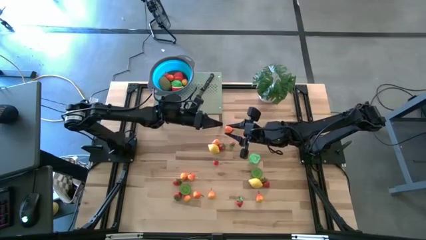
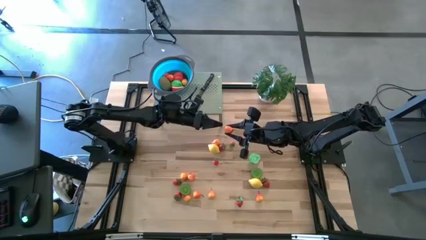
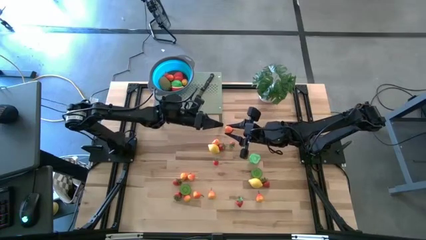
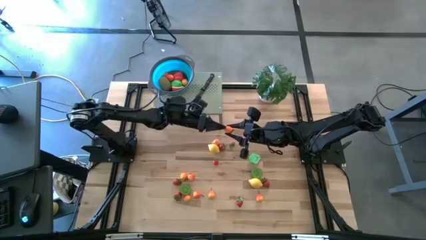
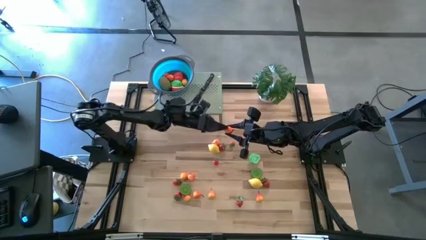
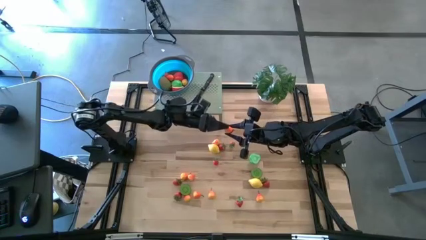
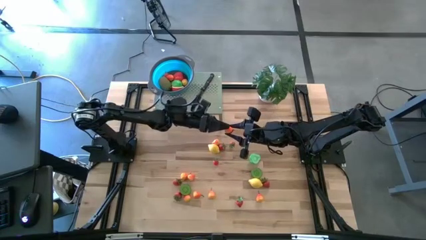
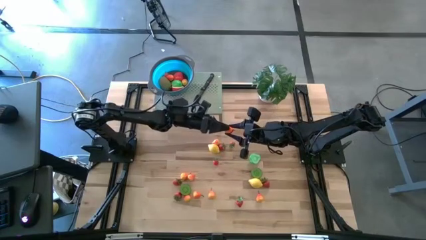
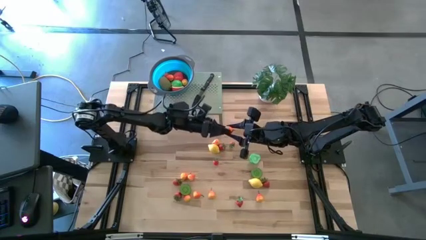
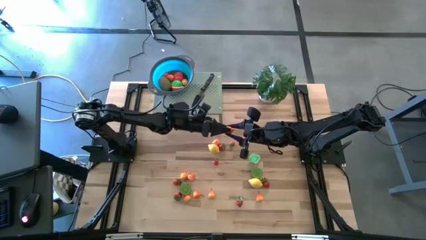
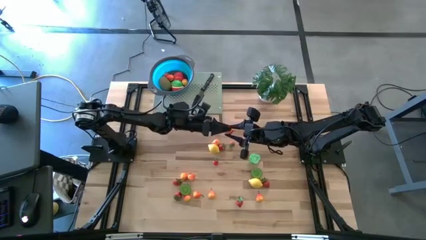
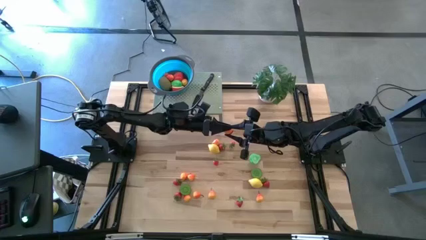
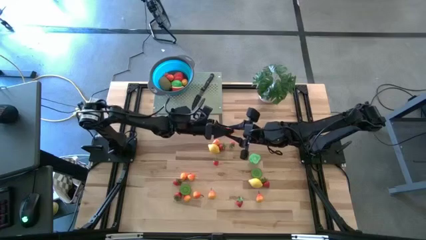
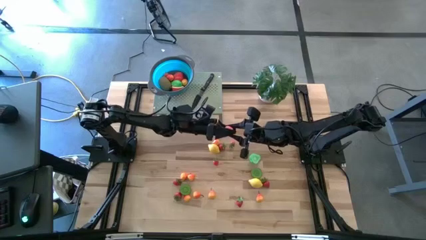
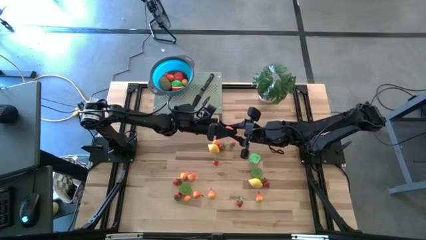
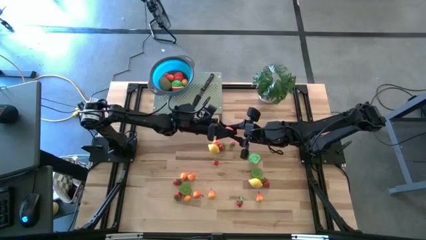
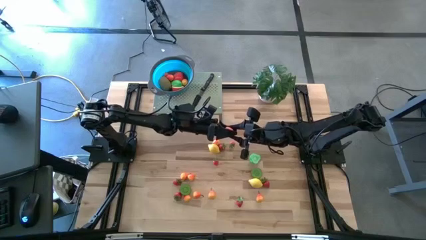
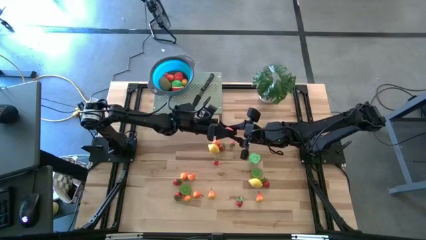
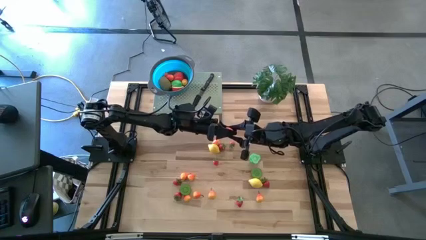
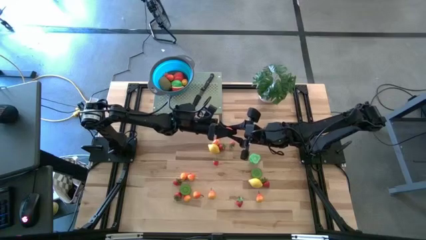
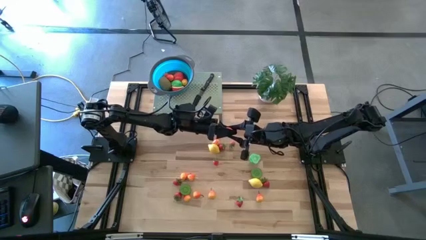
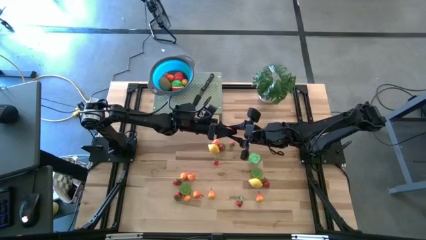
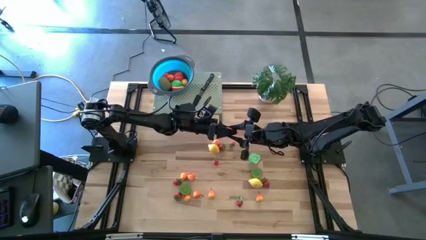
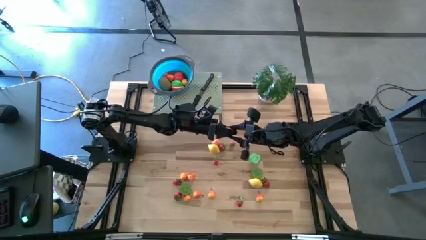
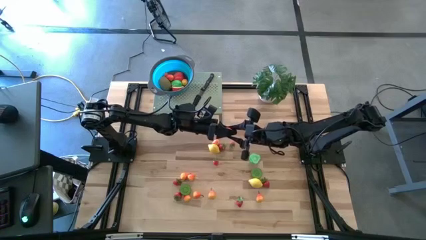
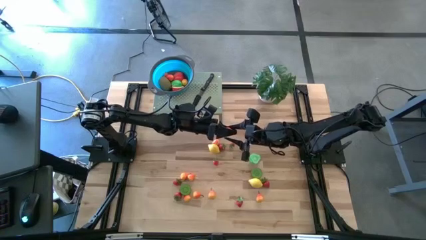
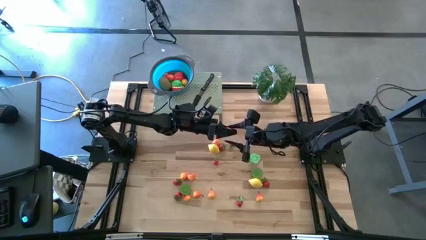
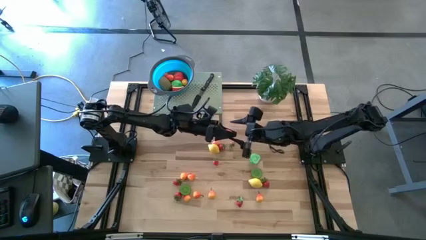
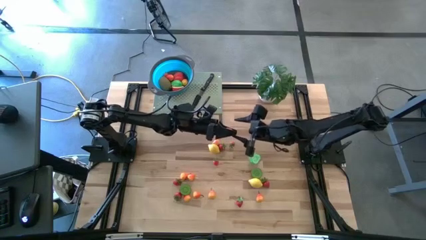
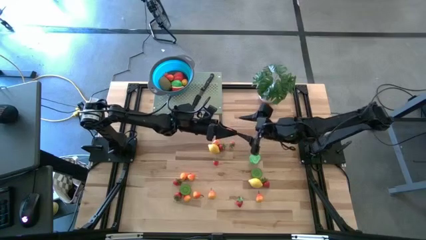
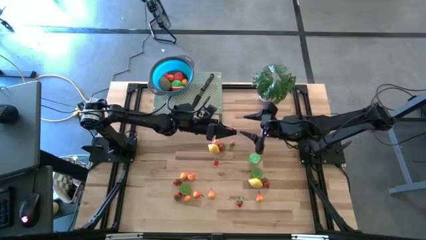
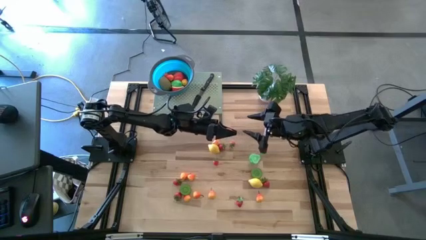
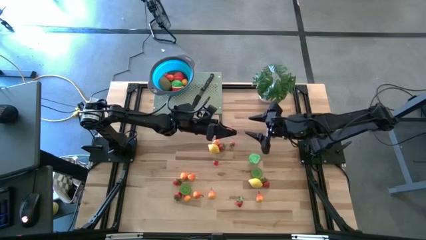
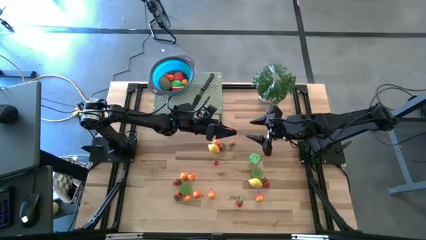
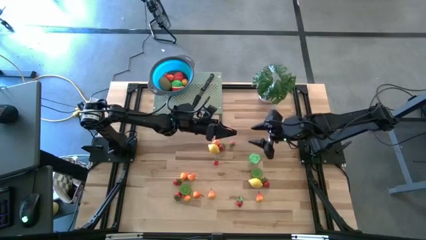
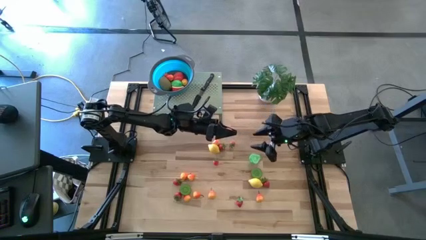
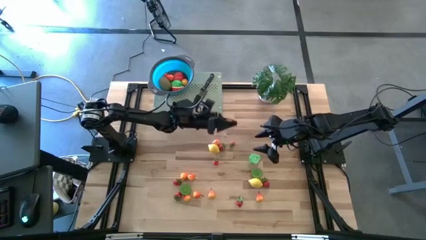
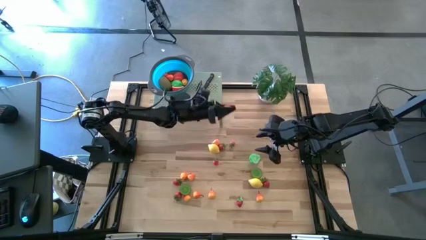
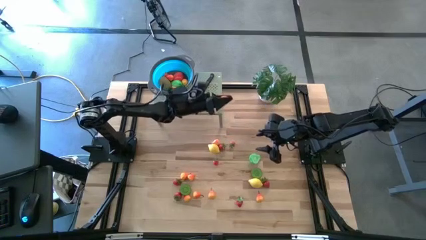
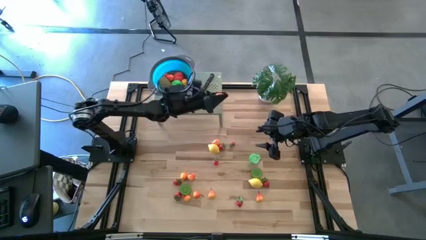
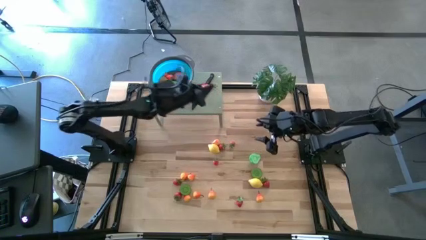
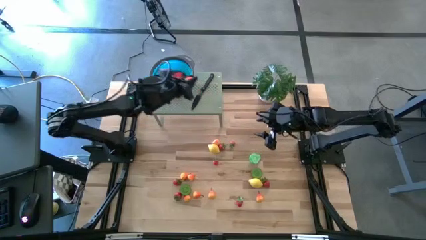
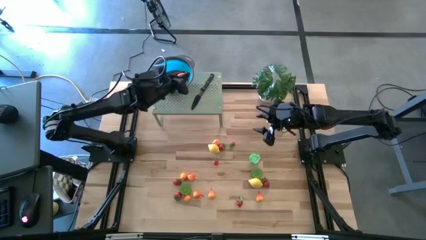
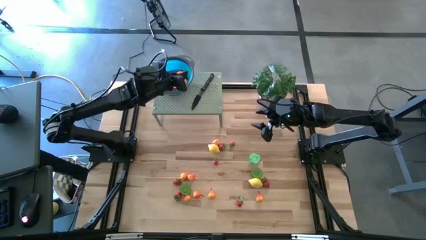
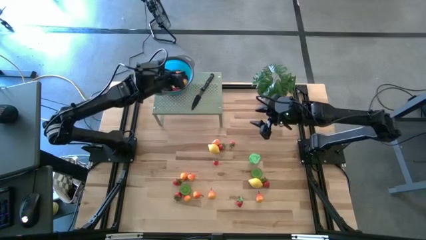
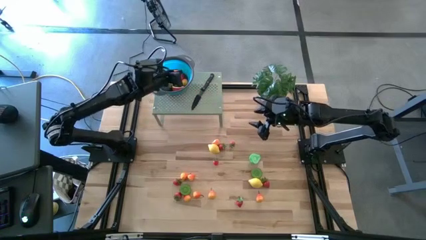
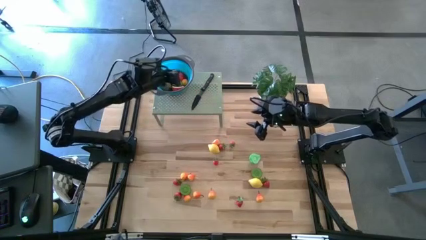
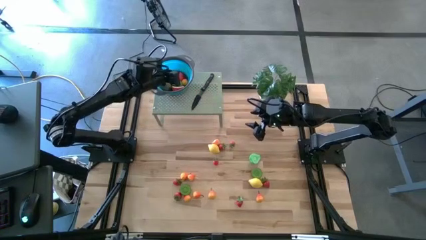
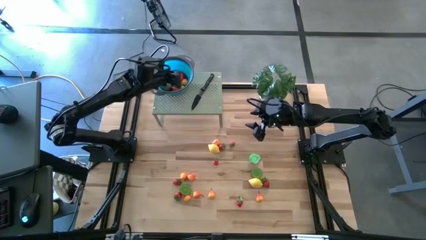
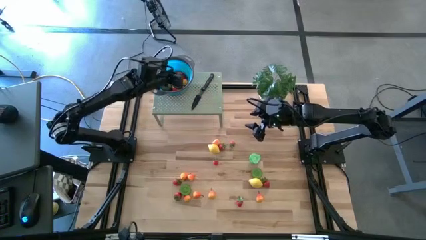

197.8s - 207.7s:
Task: Pick & Place Fruit
Put the orange pear into the strainer bowl on the shelf

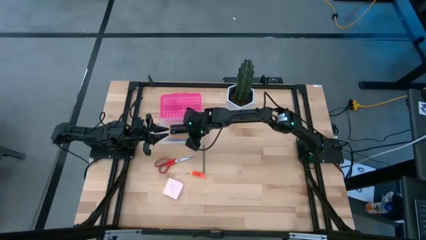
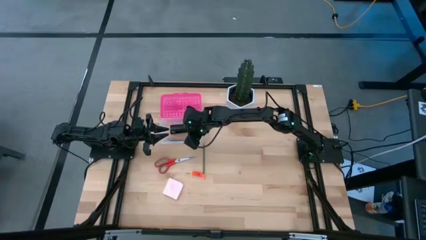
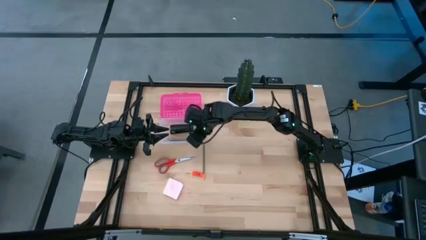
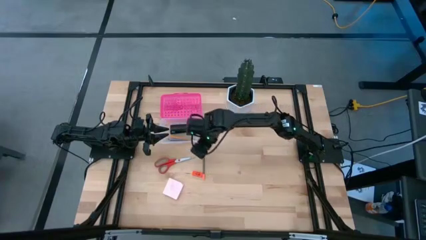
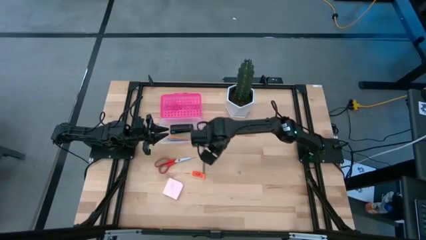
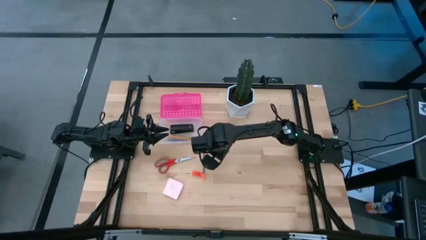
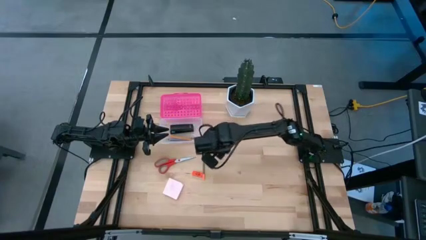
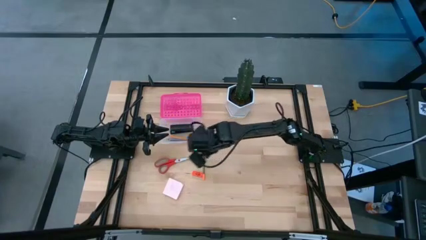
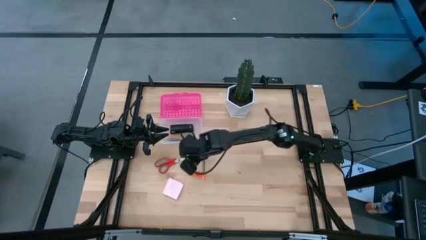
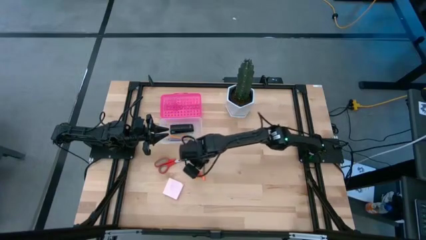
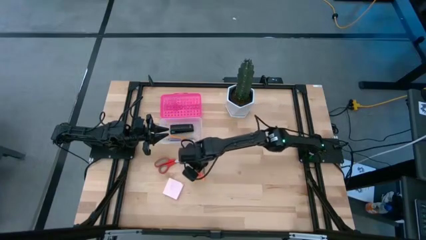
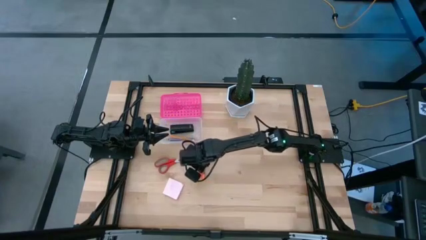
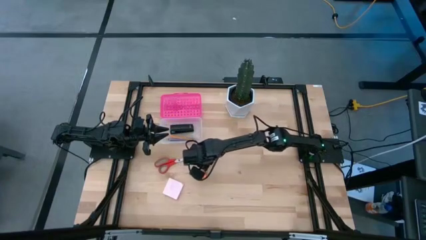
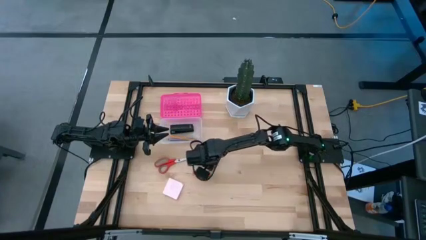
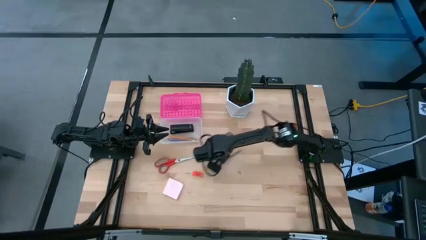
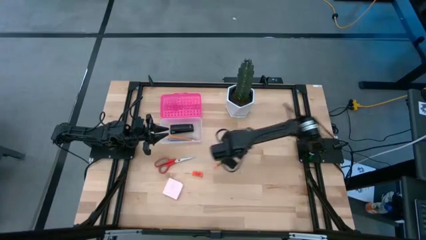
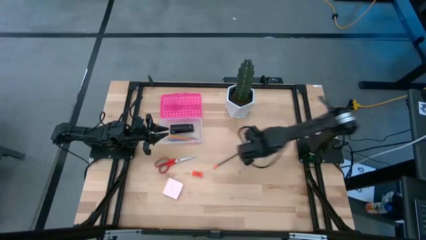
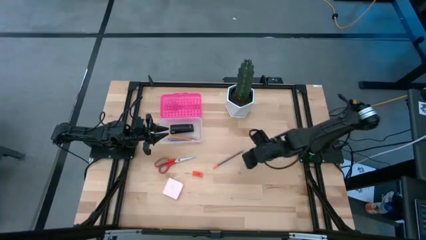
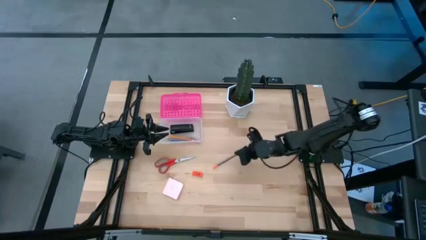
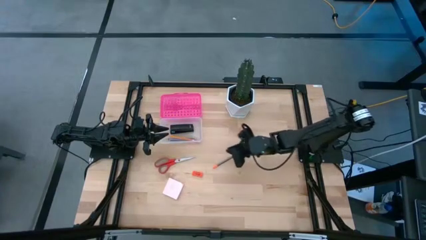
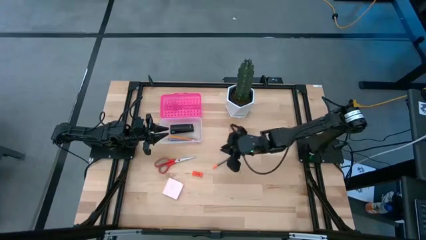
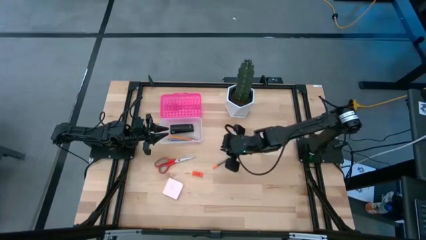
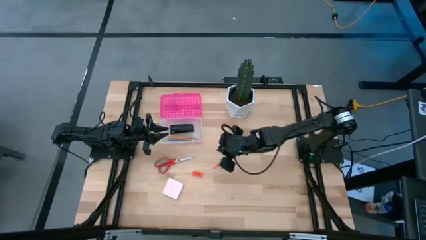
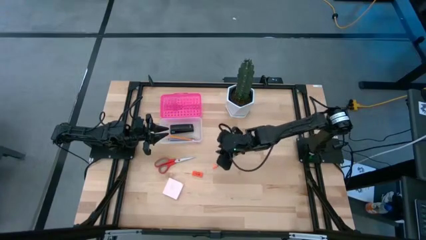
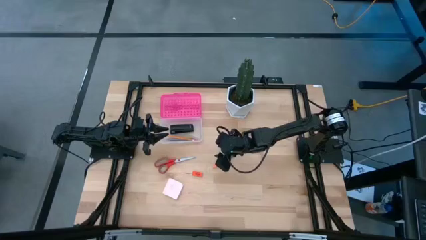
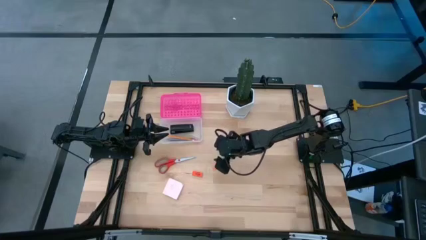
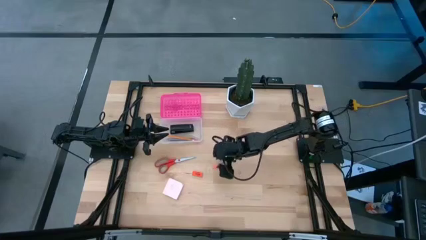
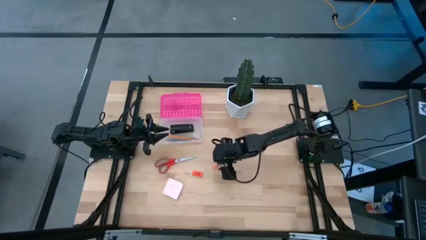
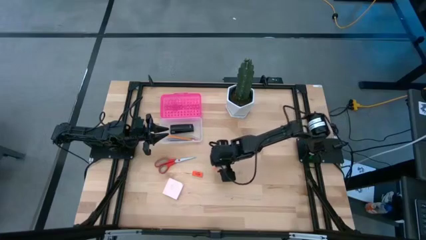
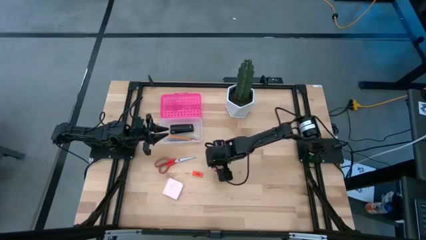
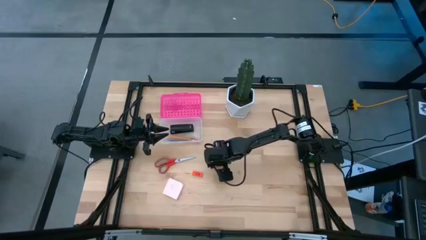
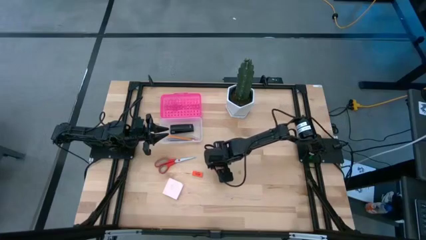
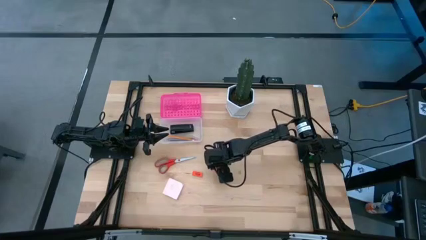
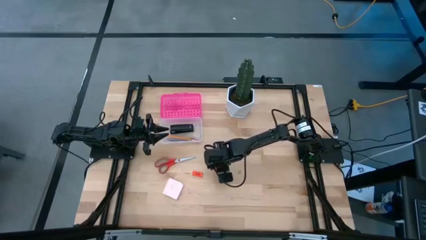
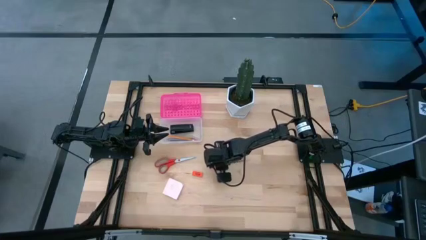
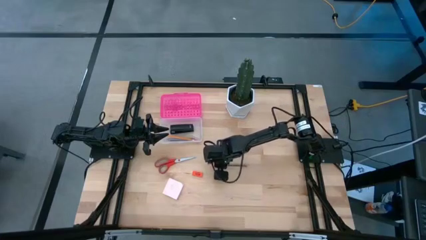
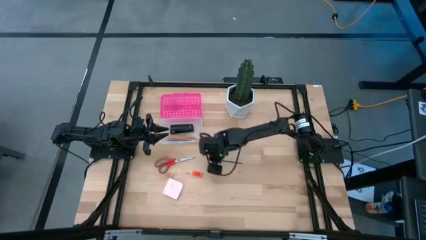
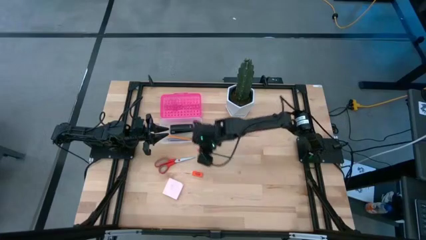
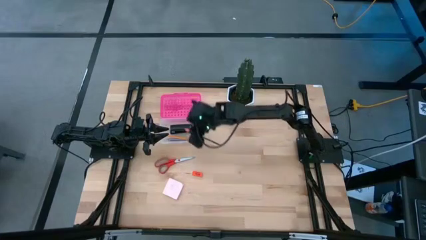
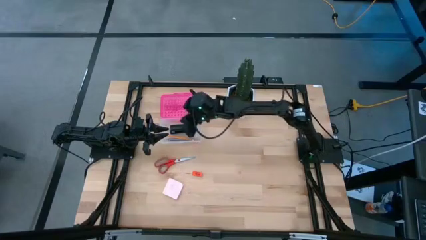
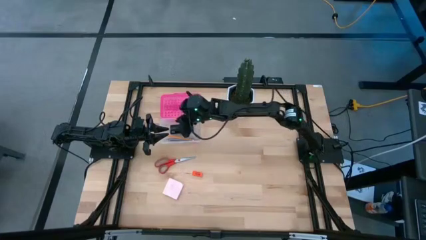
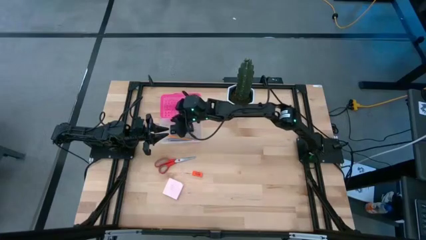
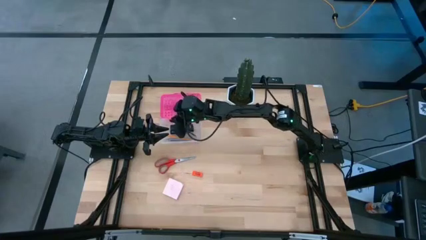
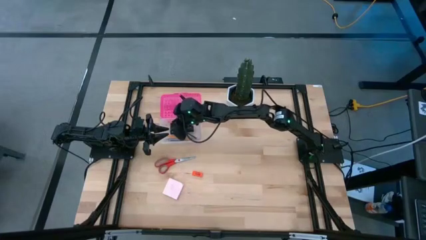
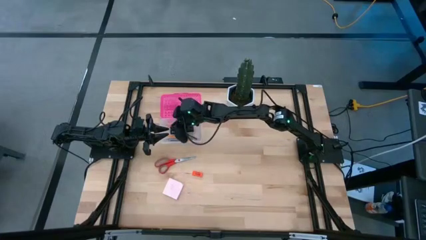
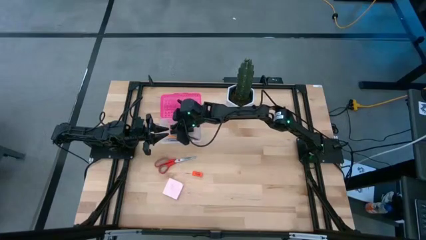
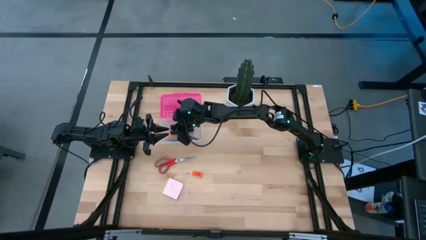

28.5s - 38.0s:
Task: Pack school essentials
Put the black pencil into the supply box
